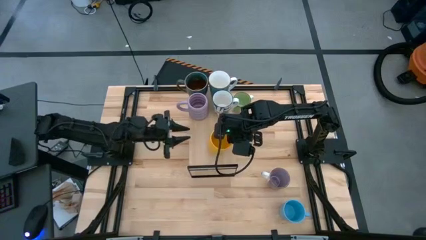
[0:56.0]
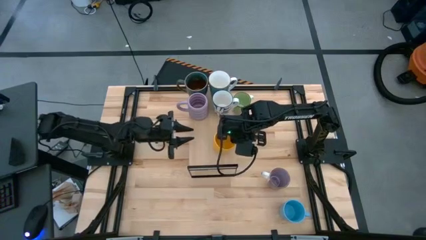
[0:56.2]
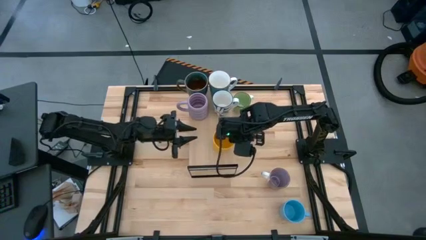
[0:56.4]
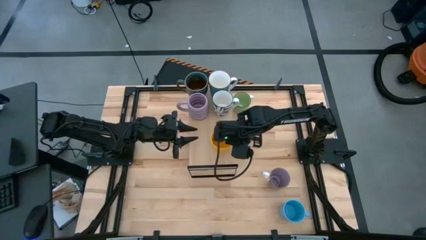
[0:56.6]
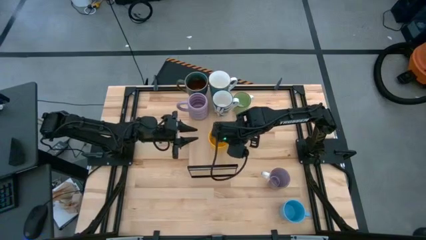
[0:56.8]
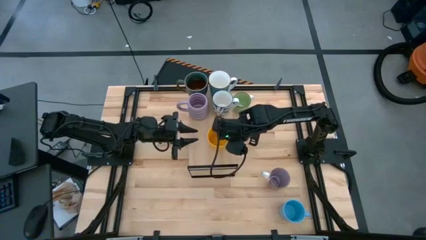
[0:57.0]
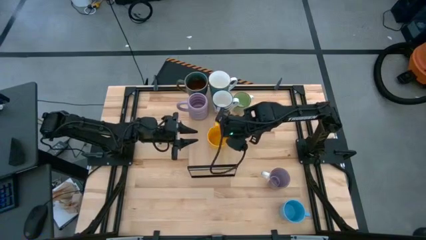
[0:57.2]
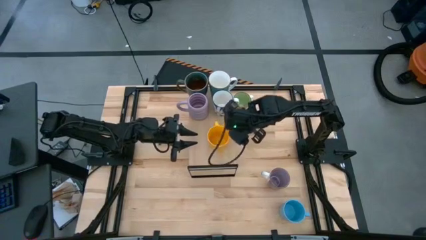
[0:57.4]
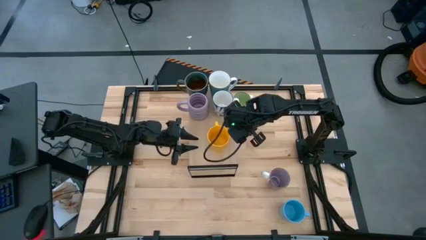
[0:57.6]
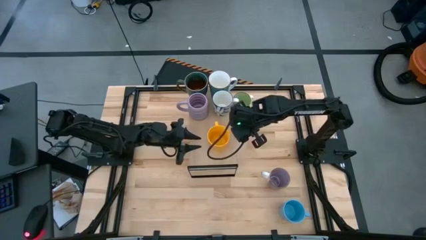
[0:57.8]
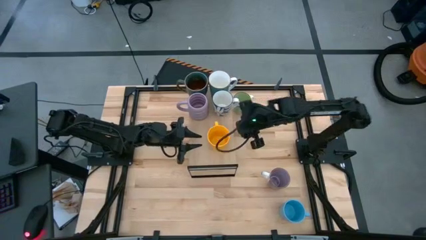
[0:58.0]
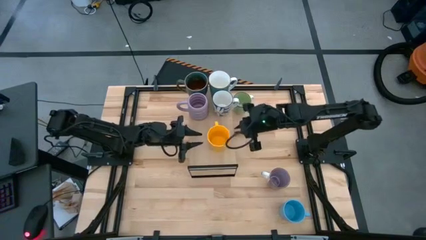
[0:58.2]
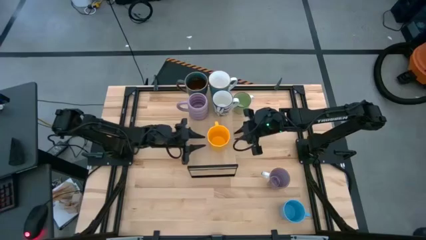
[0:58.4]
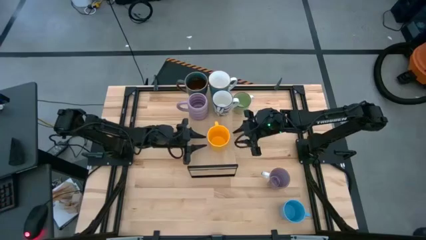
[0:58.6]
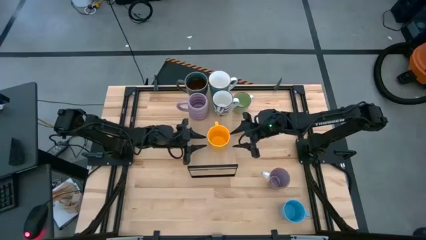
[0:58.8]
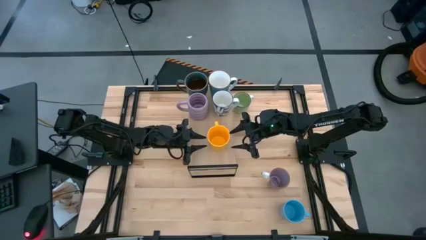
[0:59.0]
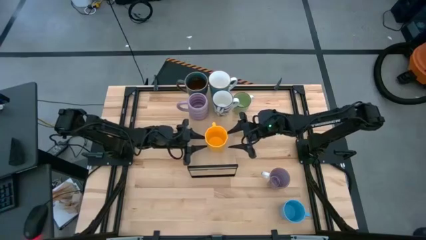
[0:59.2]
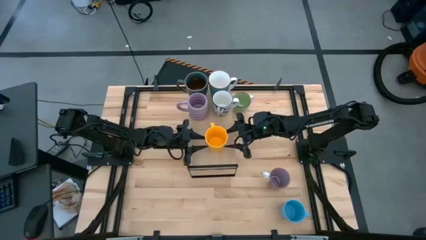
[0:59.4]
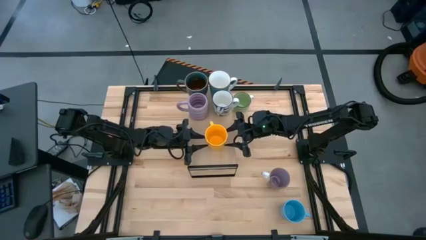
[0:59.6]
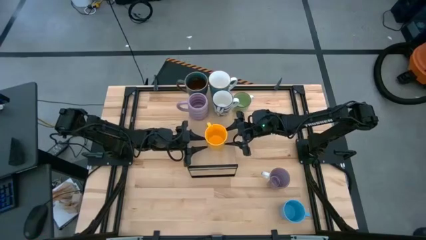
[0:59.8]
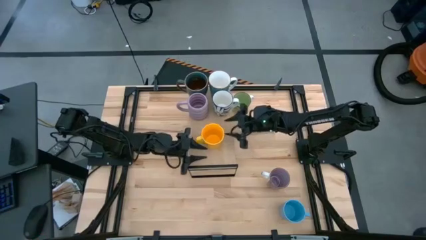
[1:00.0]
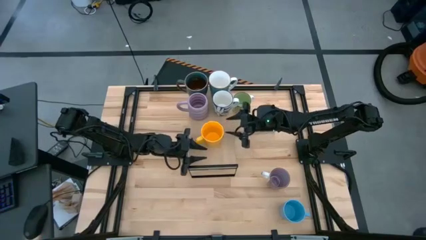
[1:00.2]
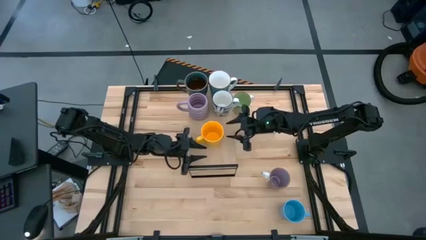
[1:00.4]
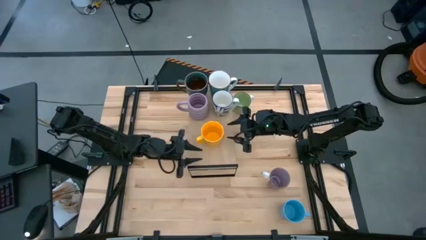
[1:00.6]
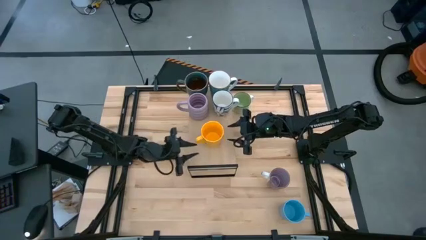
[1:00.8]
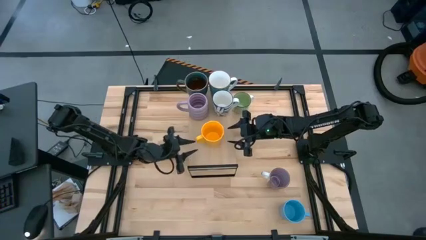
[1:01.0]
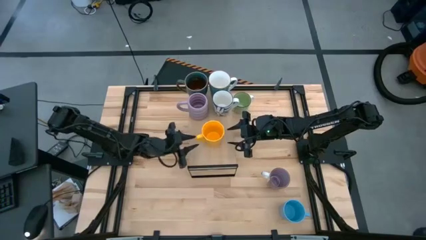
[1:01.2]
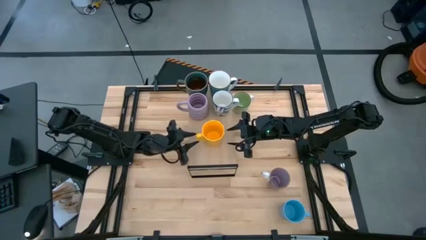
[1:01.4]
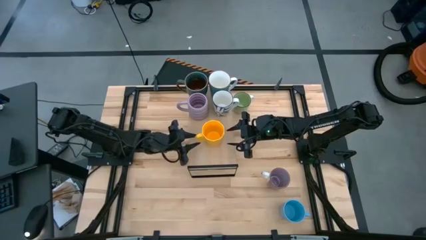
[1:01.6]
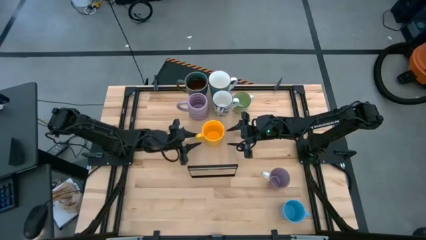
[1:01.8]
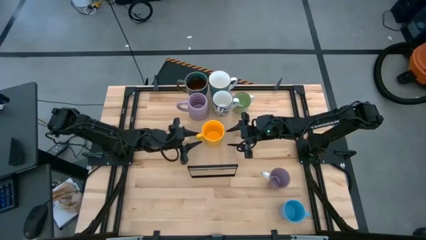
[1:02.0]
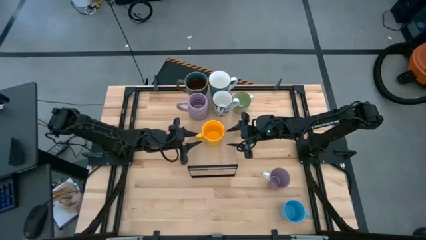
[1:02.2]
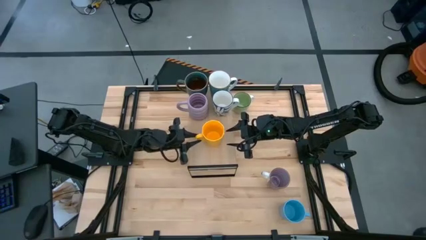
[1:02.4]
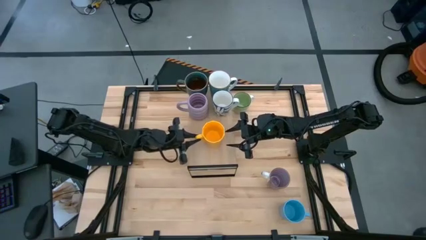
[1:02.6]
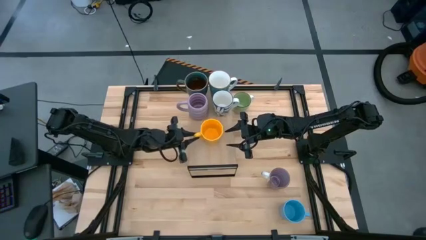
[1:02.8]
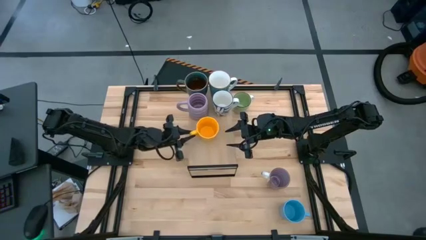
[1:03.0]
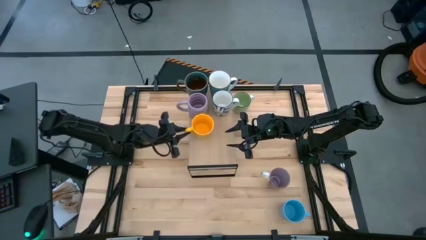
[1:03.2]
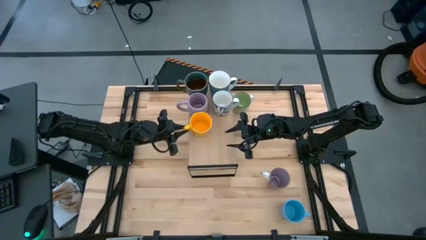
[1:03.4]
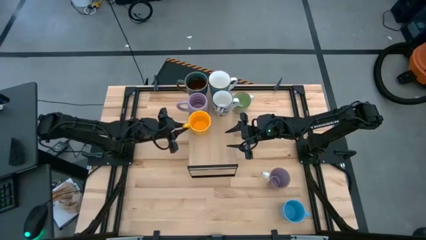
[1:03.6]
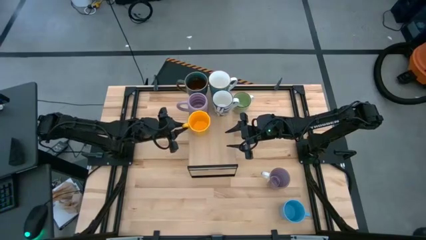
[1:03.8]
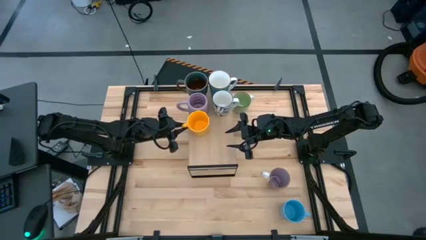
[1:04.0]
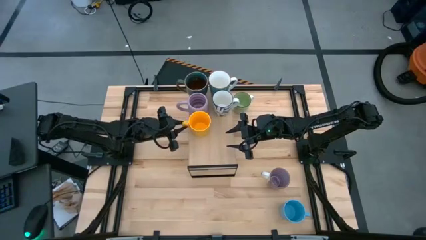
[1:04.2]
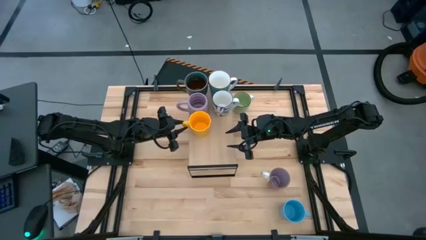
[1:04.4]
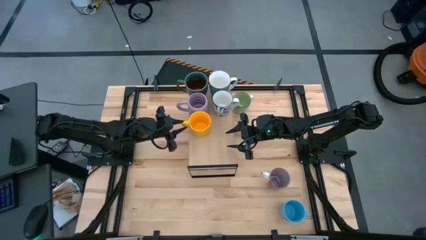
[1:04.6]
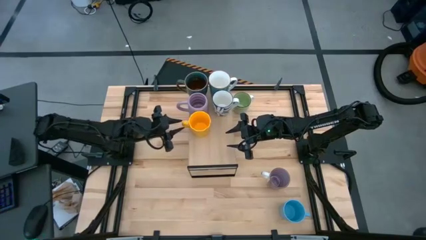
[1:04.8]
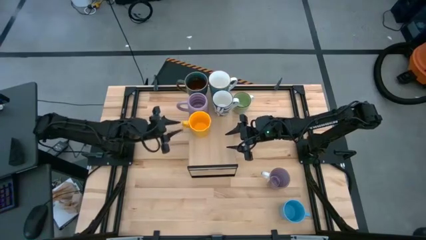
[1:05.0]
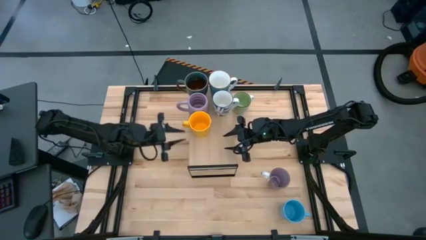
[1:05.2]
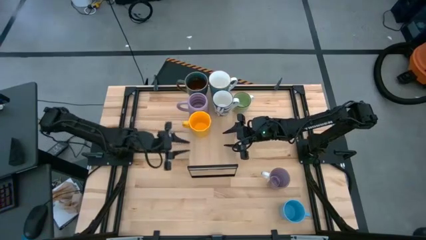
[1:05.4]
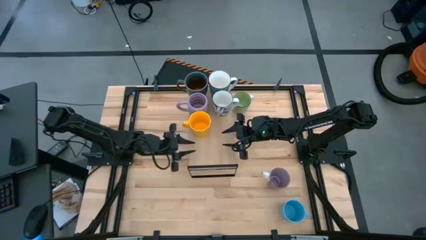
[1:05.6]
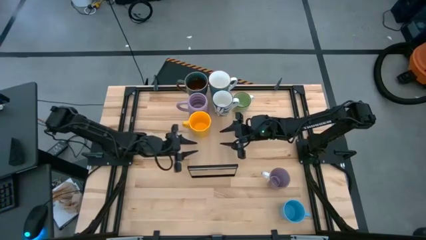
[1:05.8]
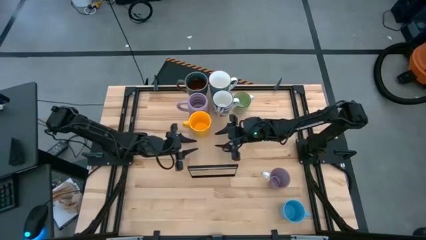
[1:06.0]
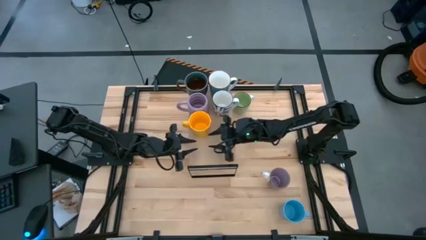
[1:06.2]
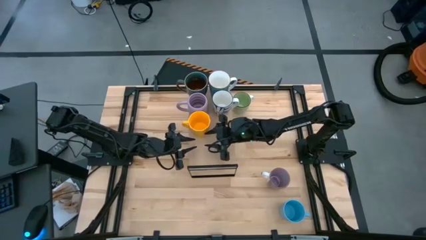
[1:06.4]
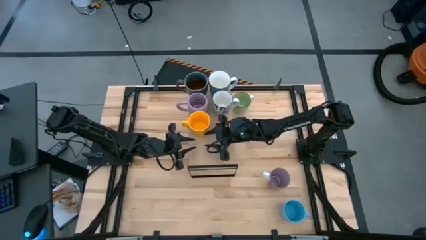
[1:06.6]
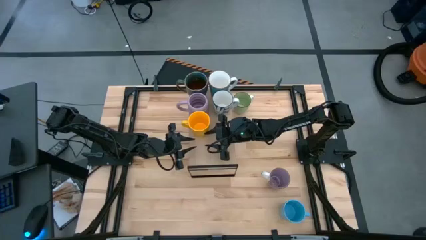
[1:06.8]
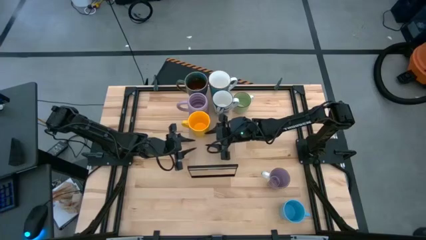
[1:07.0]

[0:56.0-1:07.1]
Task: Place coffee mugs
Put the yellow mug on the shelf

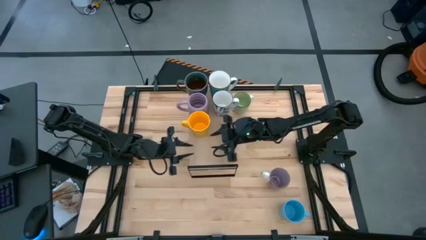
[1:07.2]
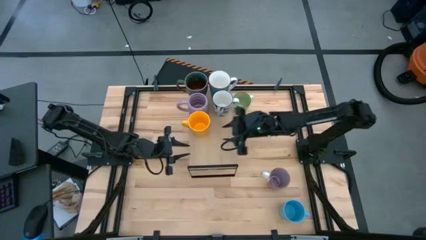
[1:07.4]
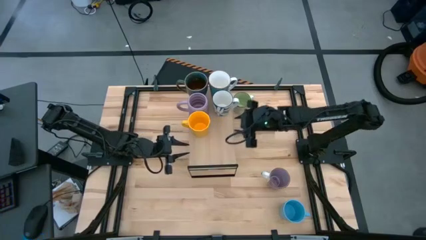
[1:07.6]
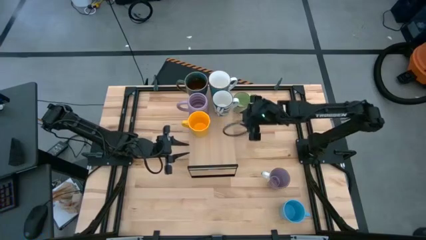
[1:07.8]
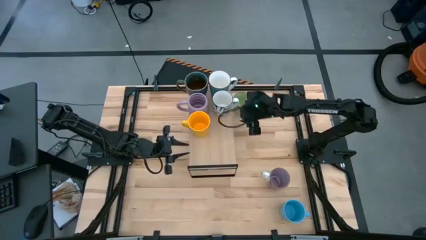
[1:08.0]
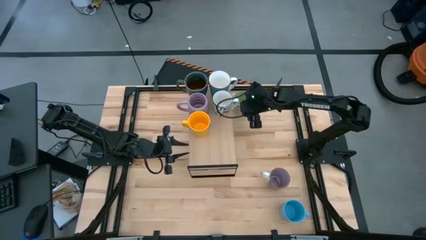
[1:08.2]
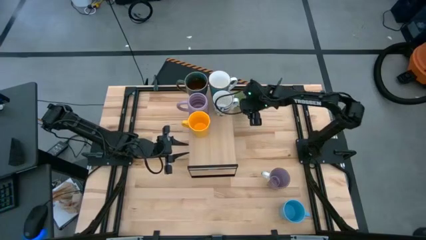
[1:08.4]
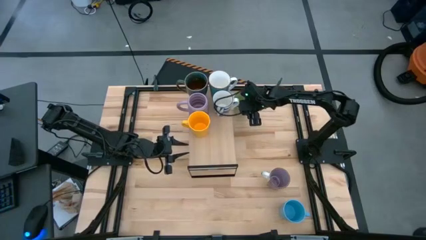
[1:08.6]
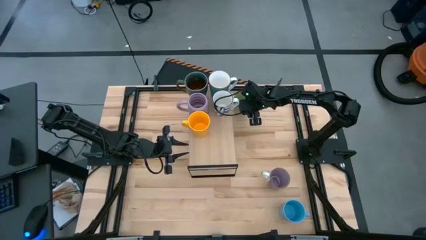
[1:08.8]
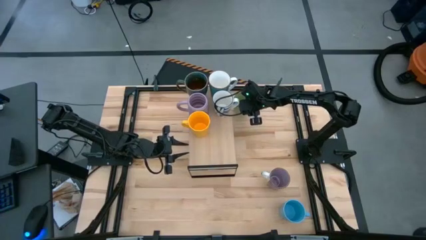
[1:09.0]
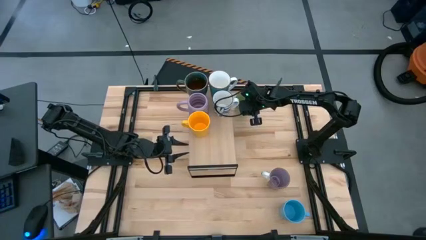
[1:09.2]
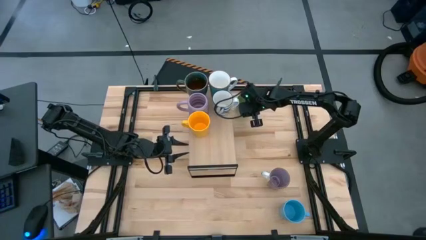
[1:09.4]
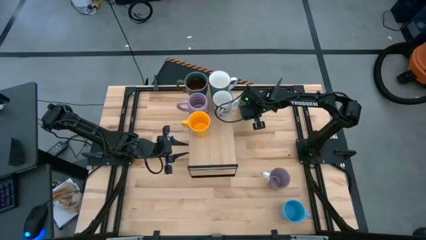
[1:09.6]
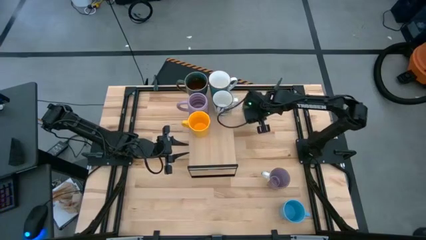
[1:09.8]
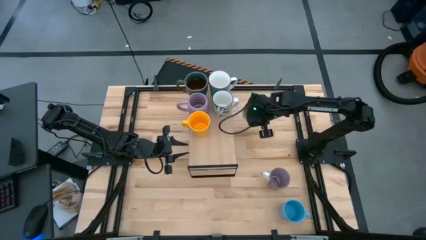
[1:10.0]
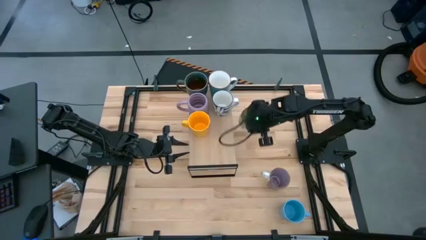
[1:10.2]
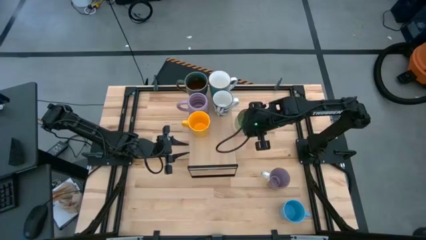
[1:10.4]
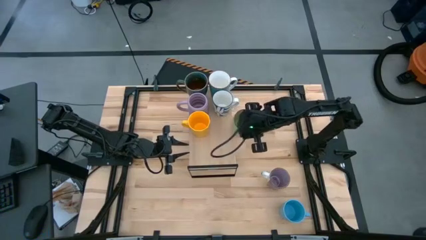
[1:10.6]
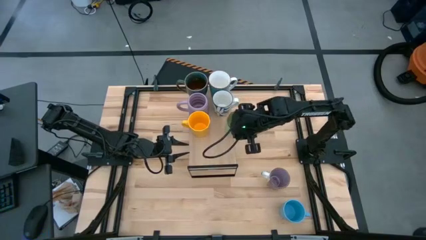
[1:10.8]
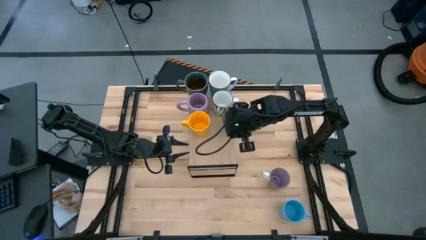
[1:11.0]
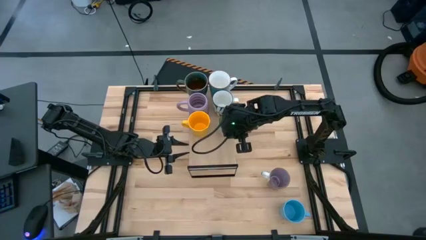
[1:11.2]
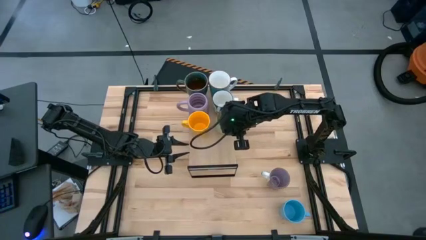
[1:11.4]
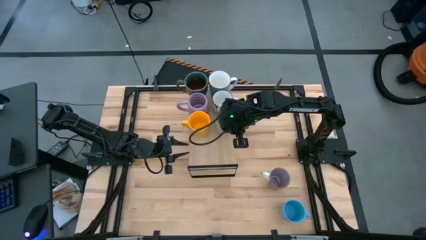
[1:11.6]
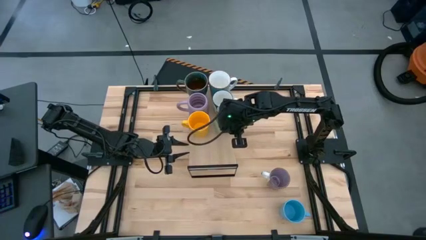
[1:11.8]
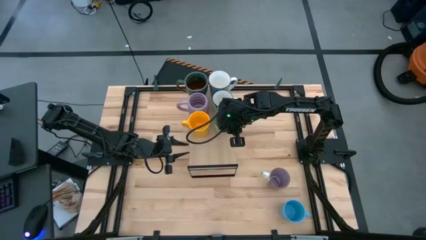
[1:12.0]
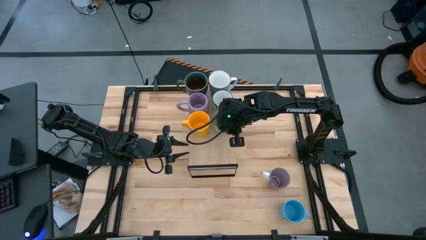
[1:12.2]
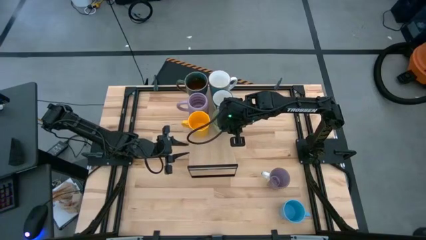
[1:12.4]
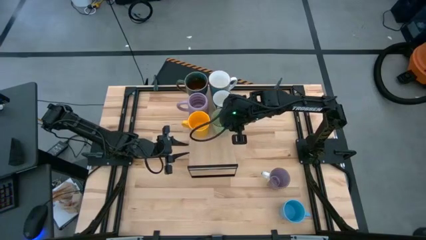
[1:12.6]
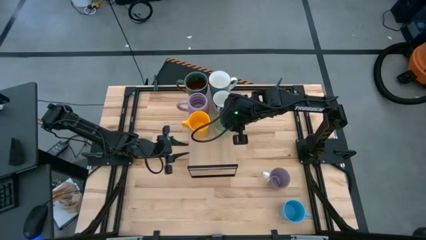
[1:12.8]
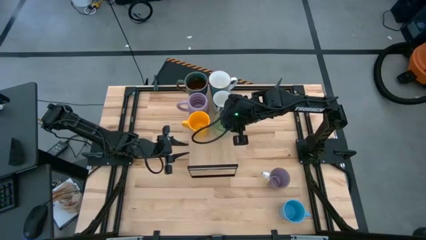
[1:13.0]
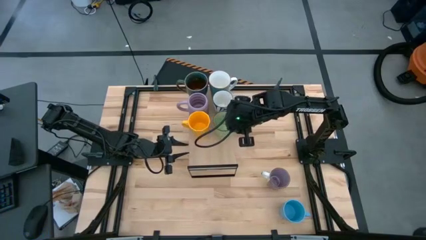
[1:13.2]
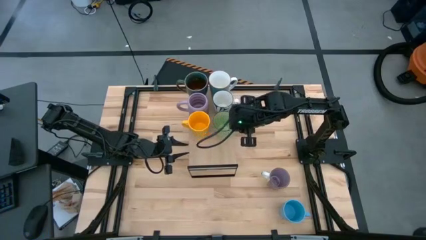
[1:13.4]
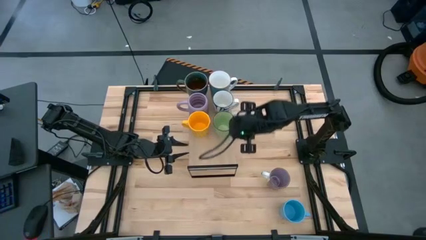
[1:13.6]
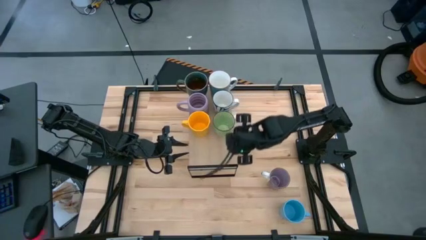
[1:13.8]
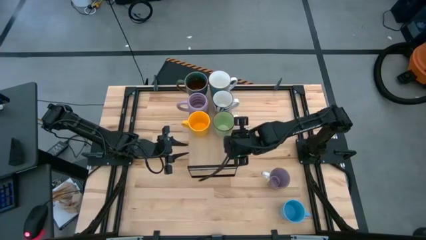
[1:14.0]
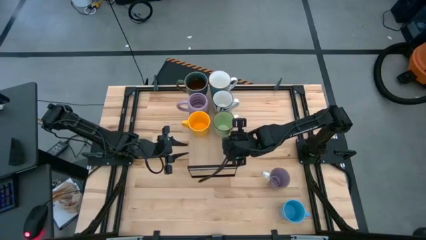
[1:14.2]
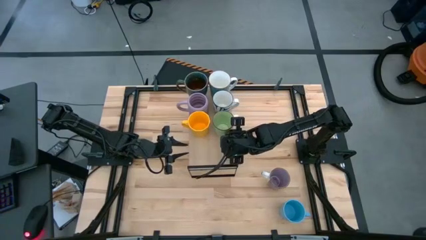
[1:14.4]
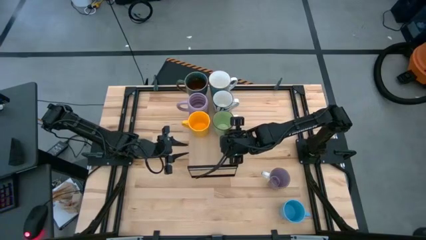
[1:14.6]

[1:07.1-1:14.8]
Put the green mug on the shelf
